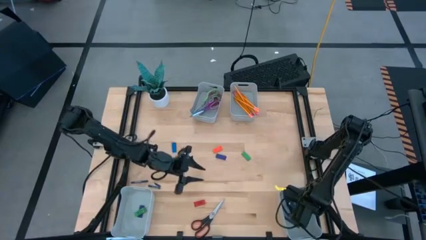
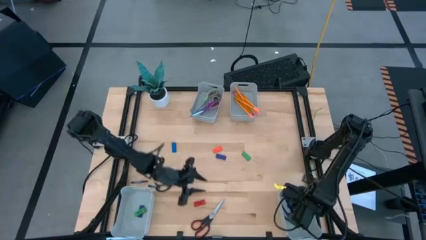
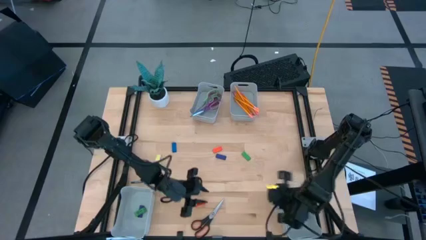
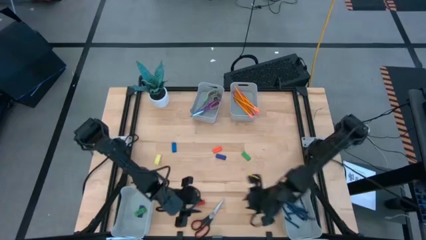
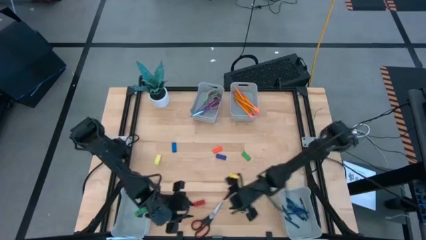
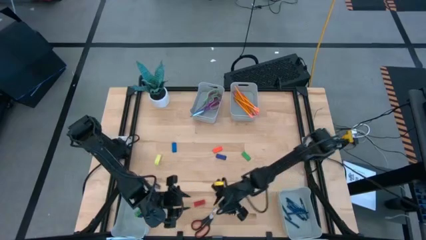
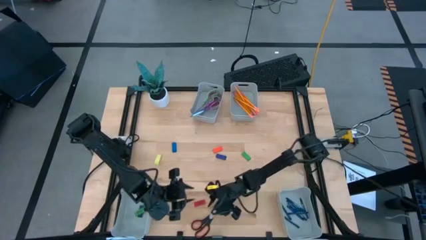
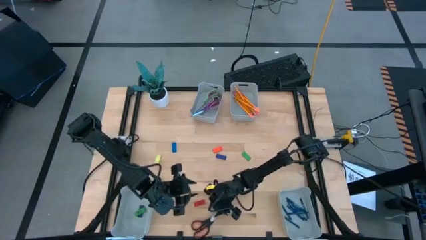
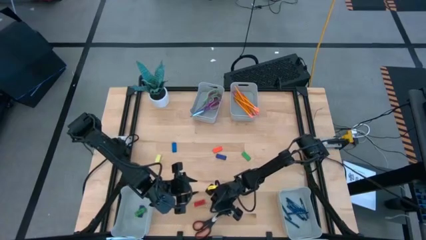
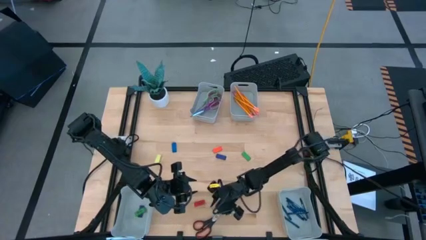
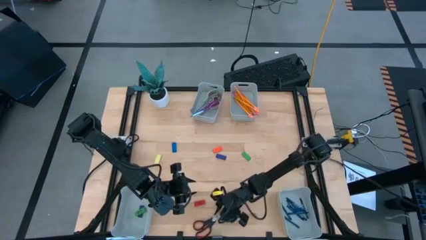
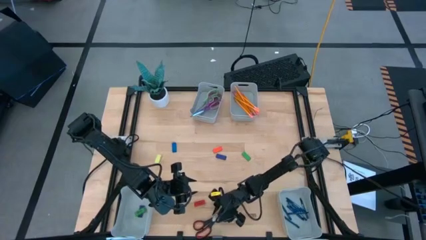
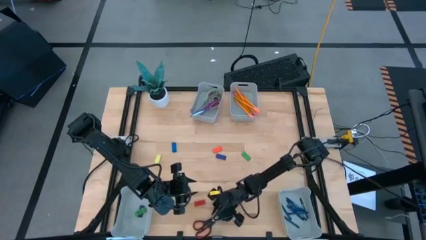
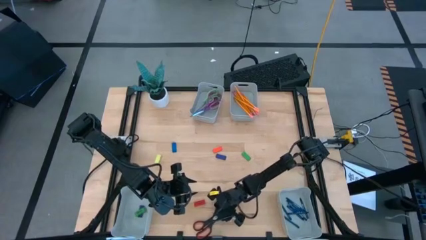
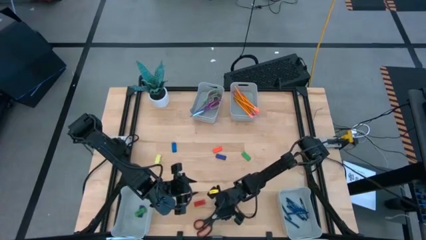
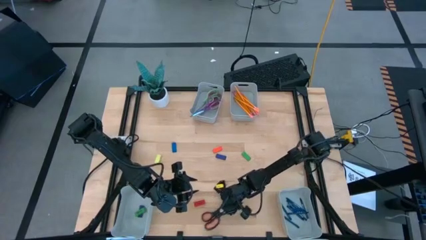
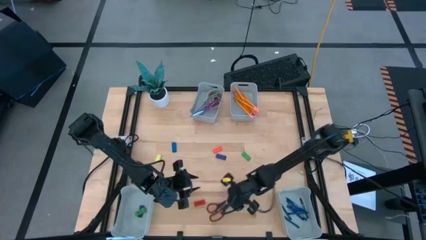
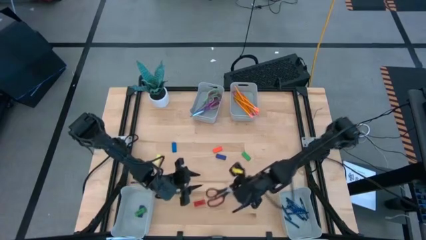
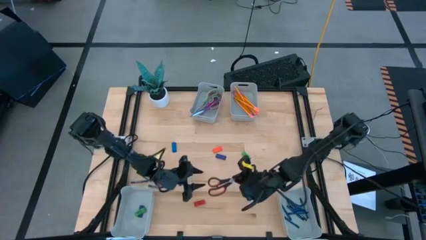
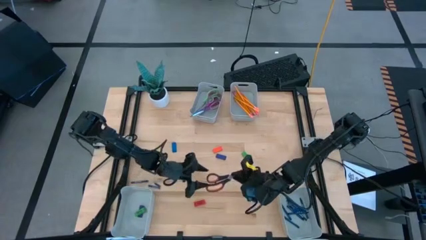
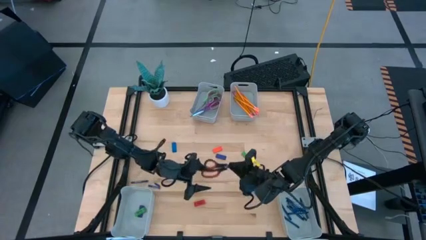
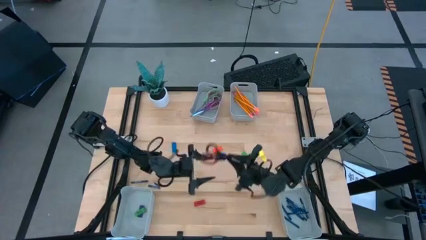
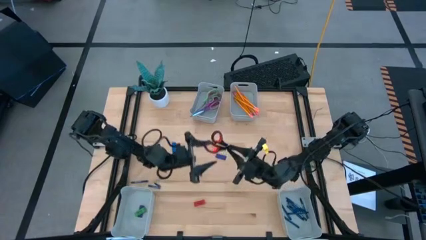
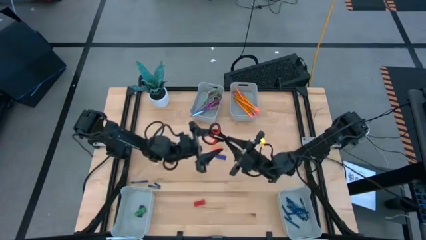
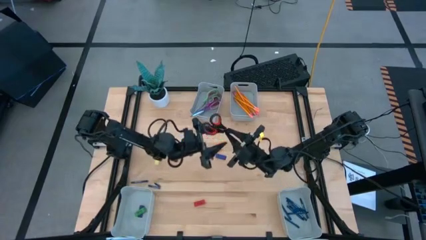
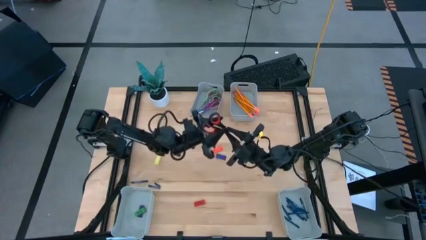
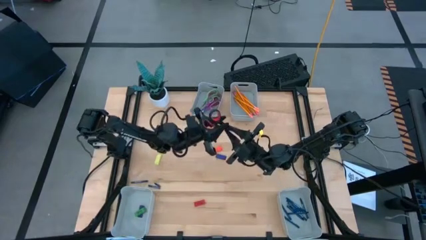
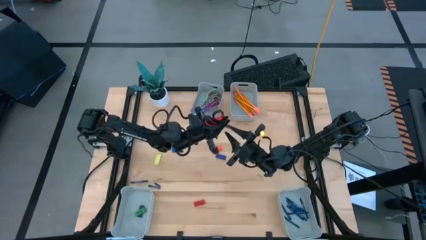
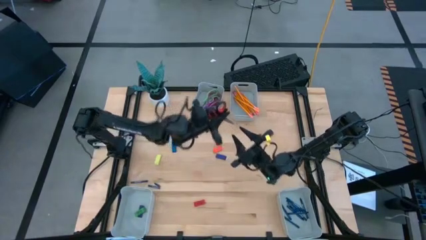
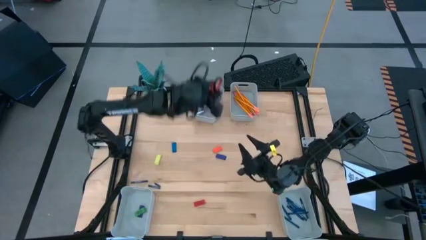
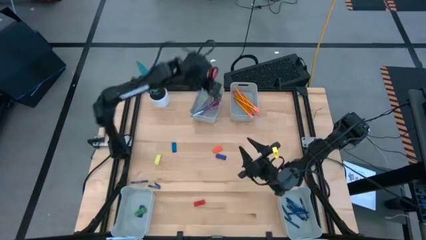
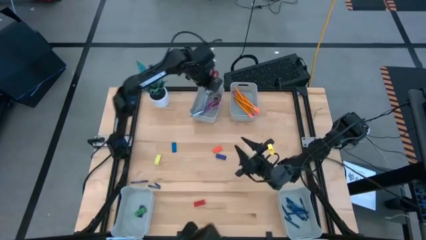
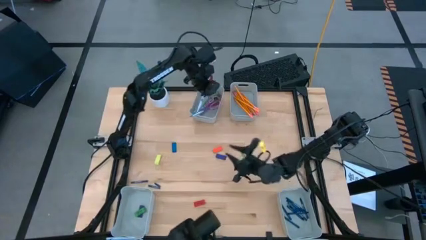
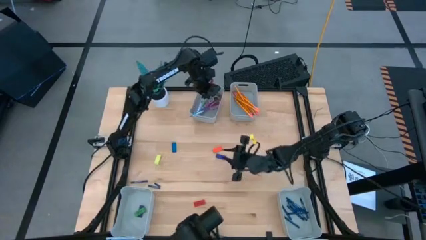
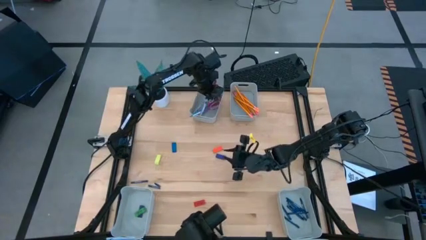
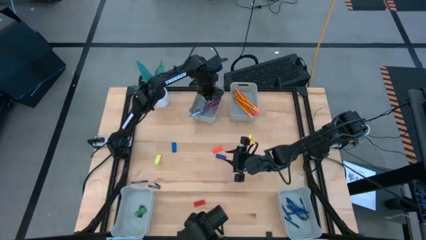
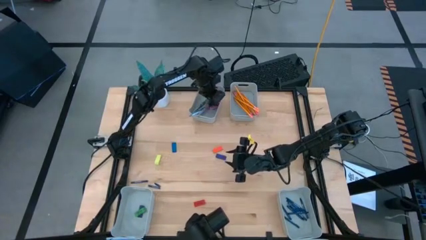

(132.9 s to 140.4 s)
Task: Sort crayons/erasers/pens/pencils in bins
Put the black scissors into the top left bin

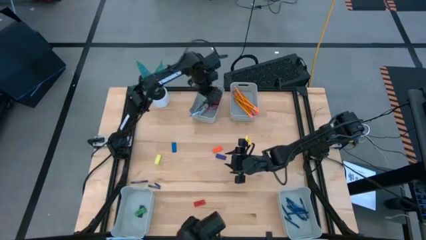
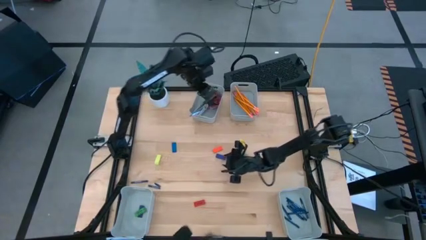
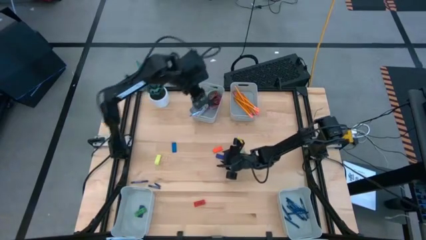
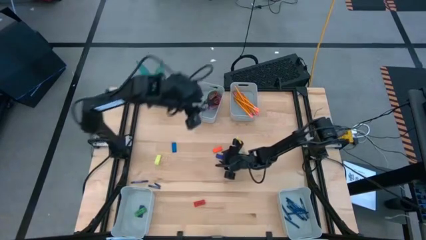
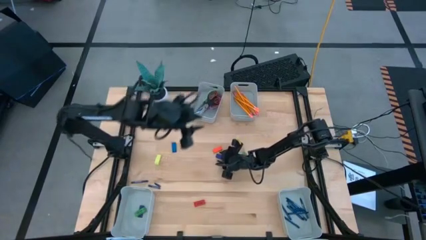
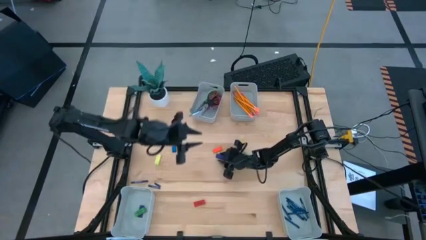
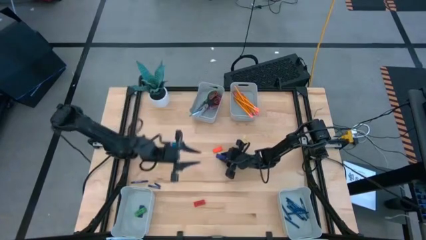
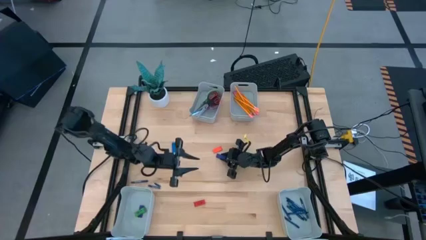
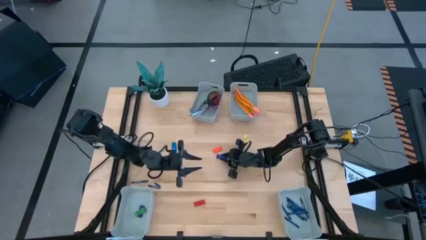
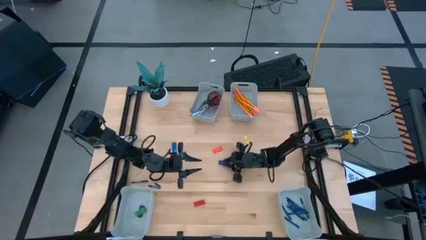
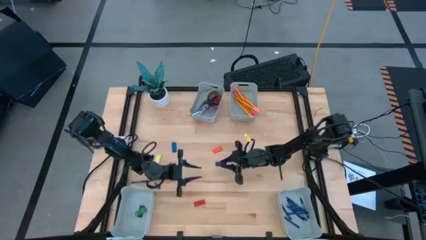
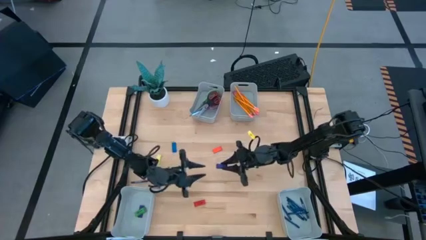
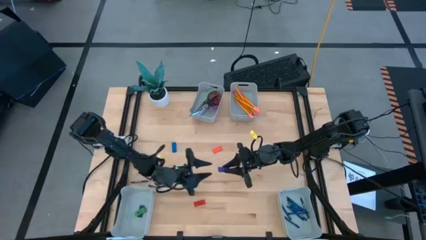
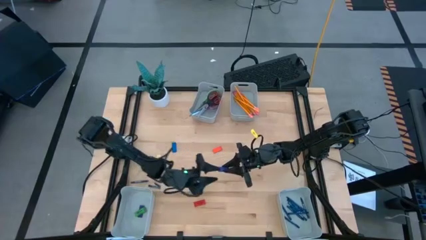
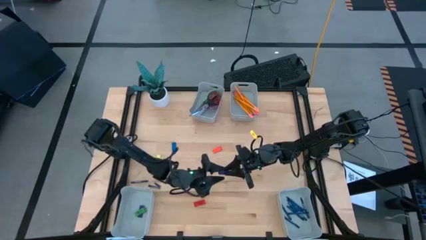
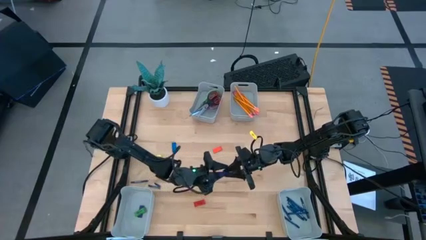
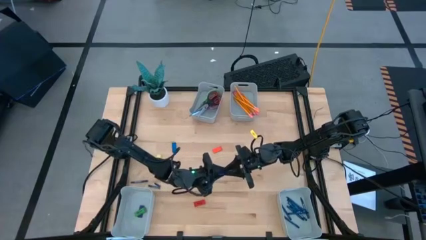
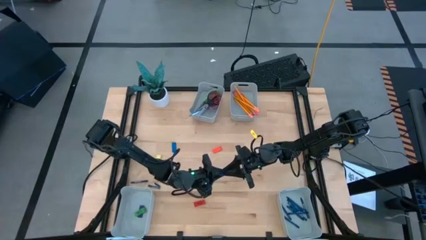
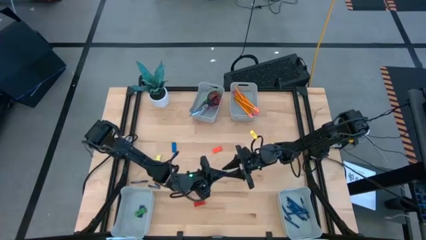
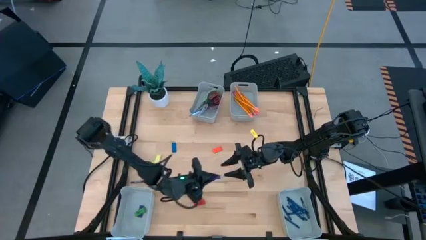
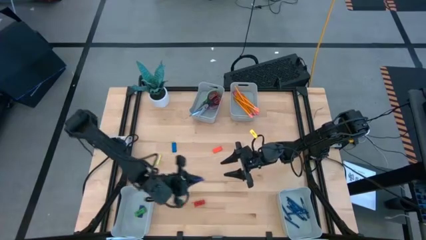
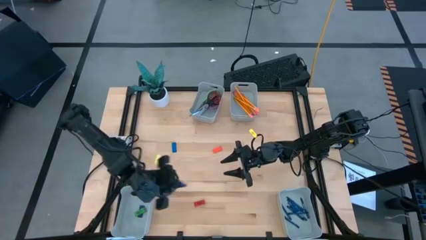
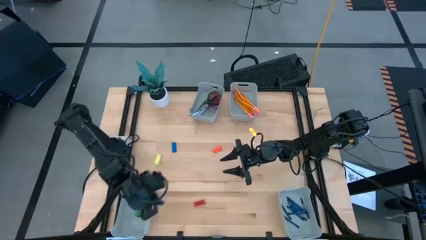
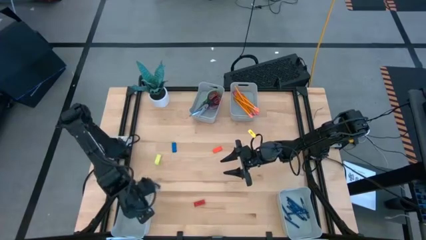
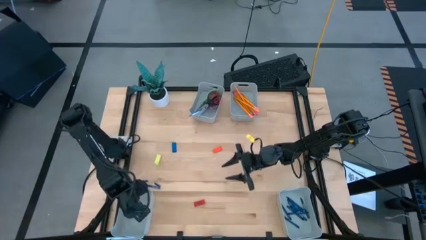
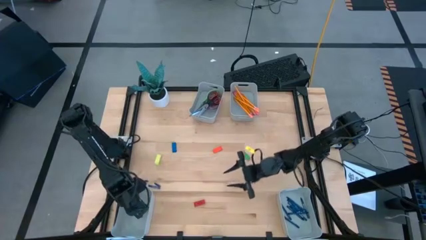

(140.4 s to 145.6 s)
Put the dark blue eraser into the bottom left bin

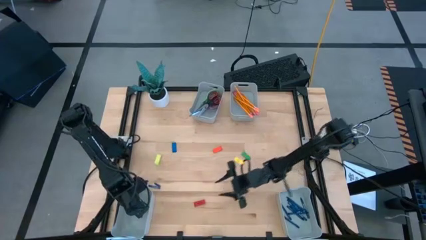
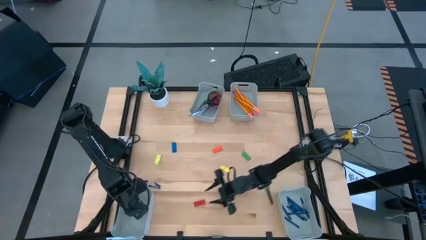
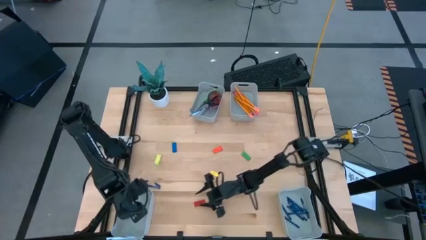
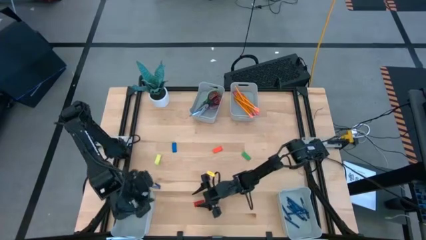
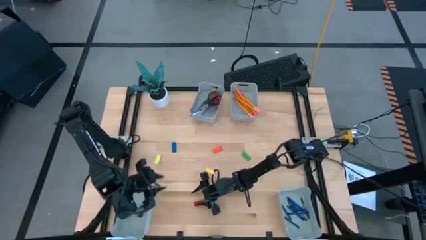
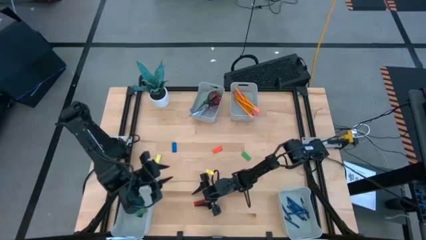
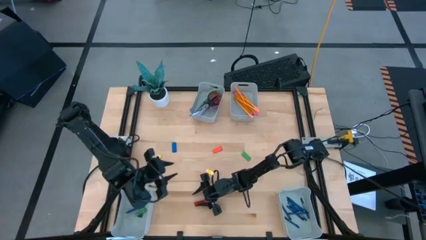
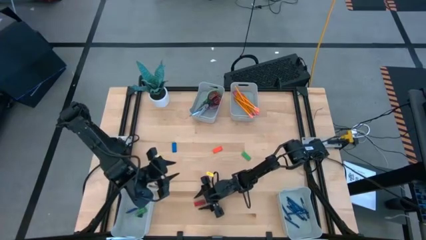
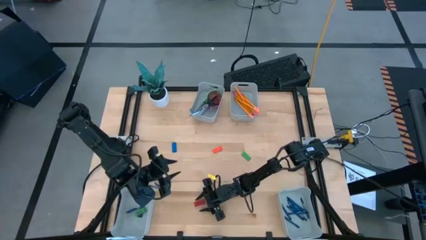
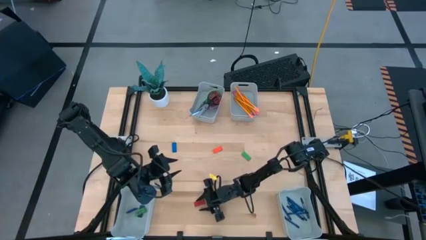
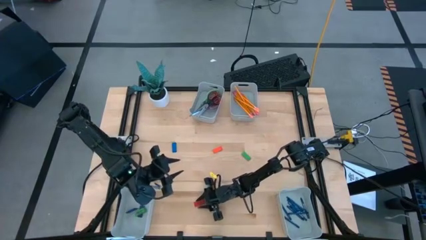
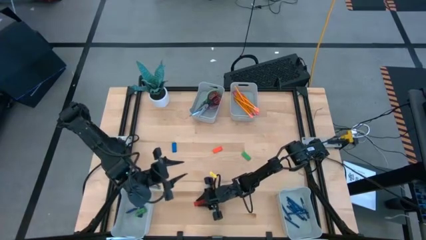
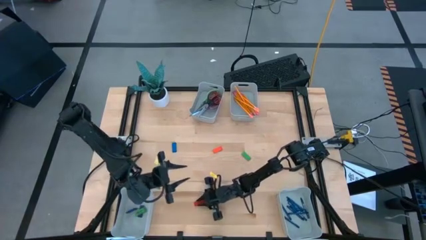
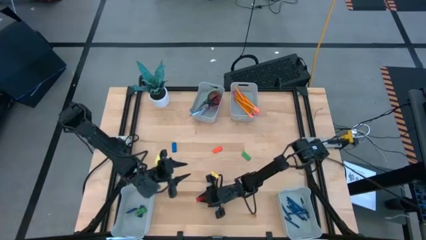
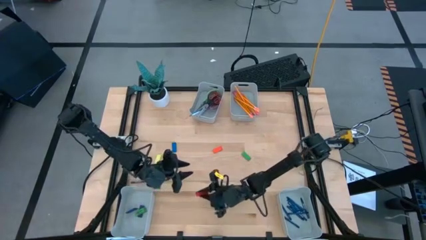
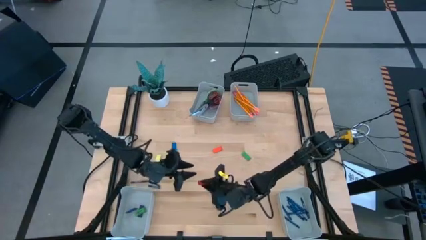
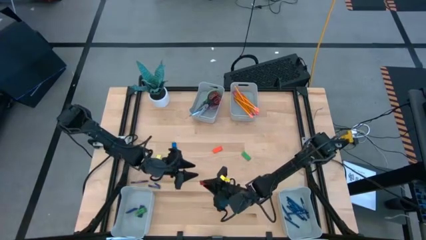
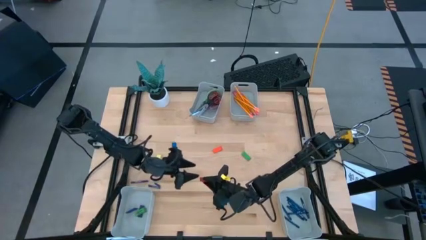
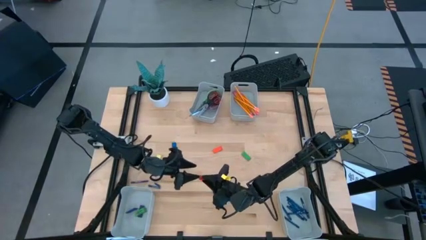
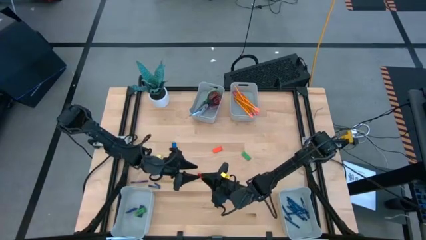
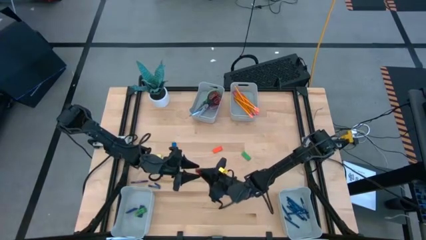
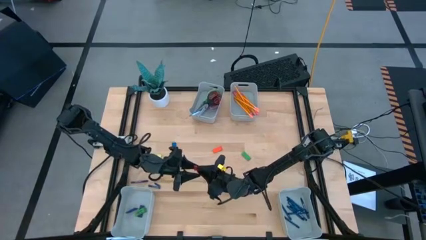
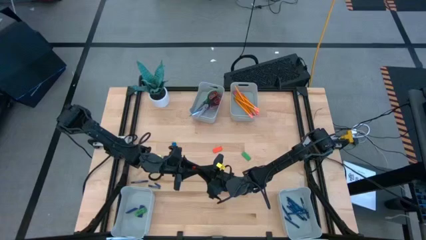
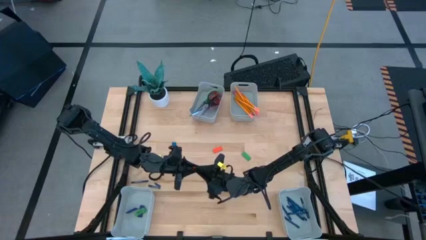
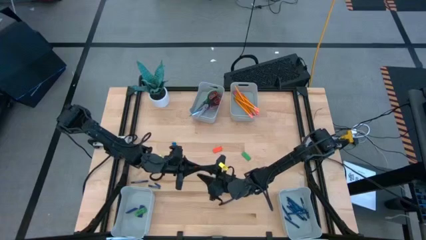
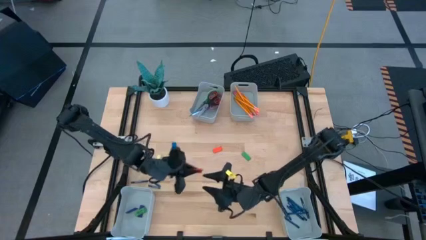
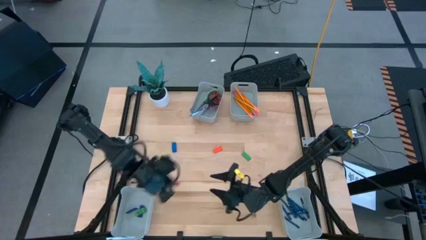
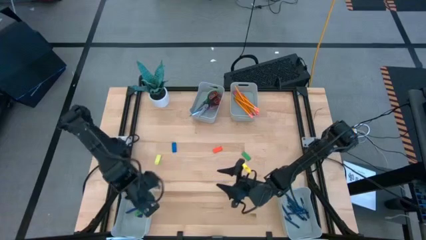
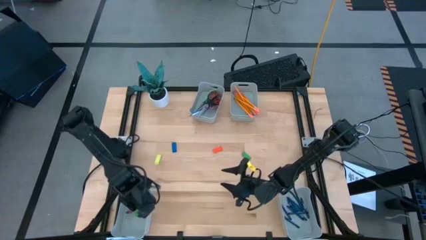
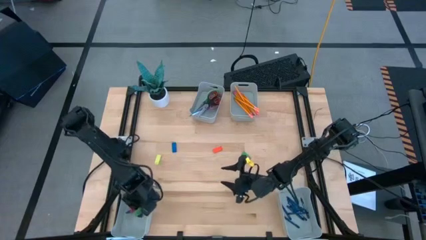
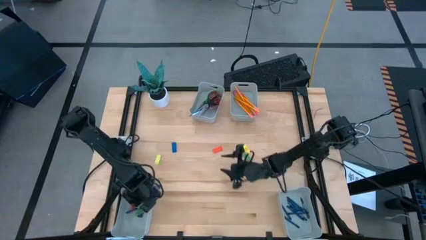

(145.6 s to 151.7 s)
Put the red eraser into the bottom left bin
